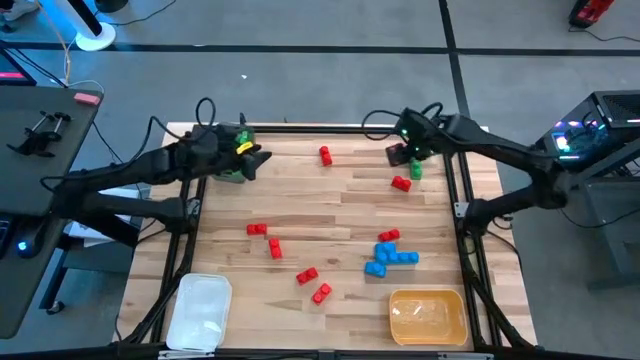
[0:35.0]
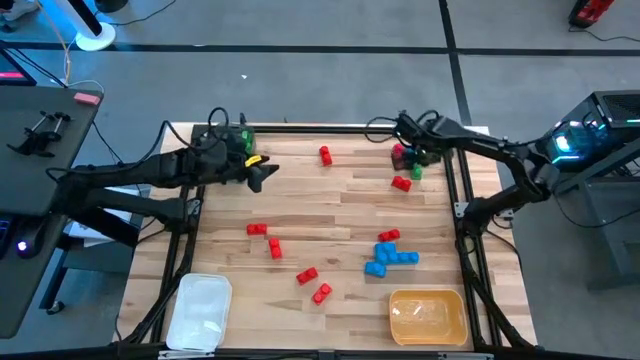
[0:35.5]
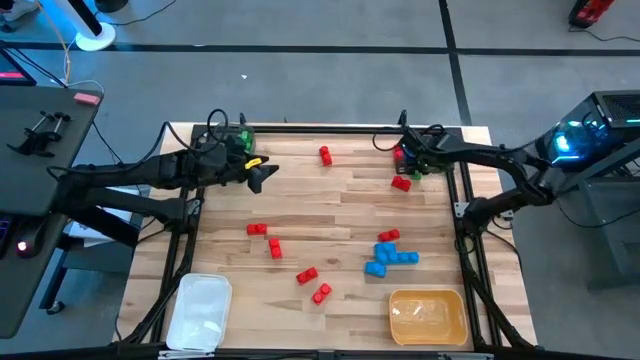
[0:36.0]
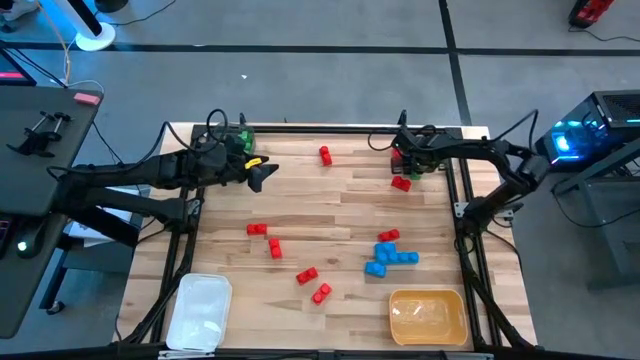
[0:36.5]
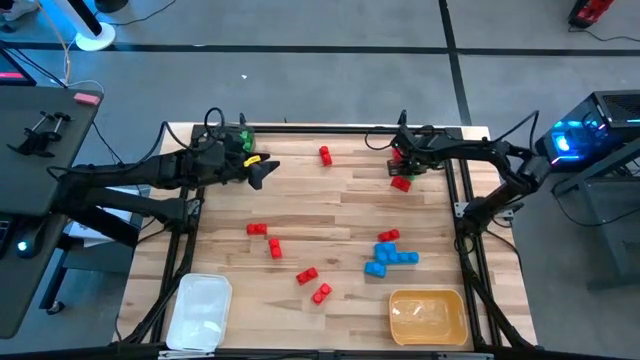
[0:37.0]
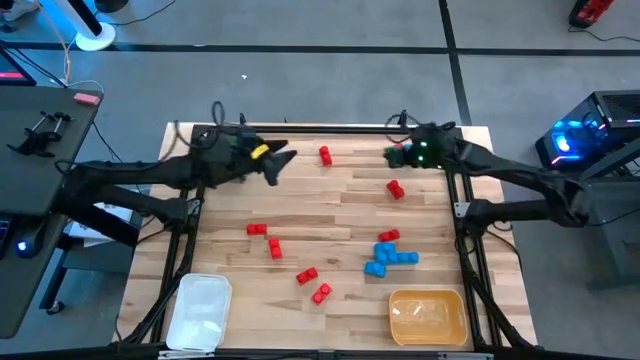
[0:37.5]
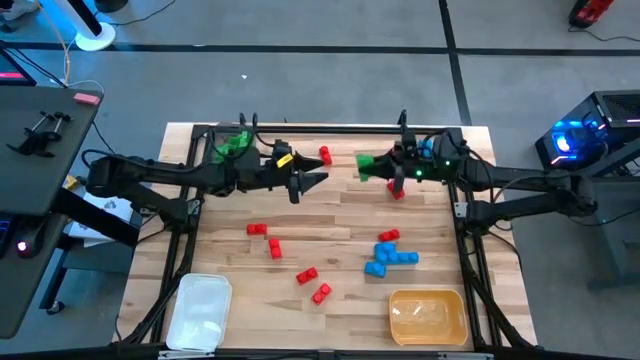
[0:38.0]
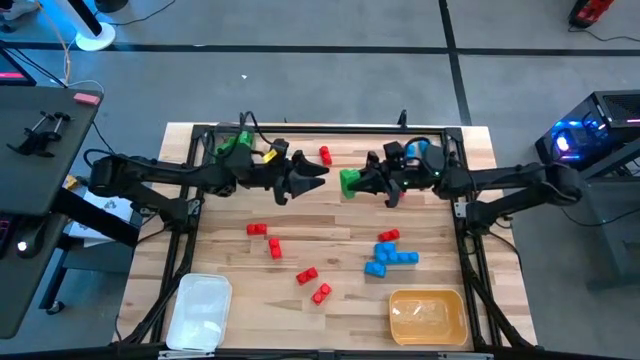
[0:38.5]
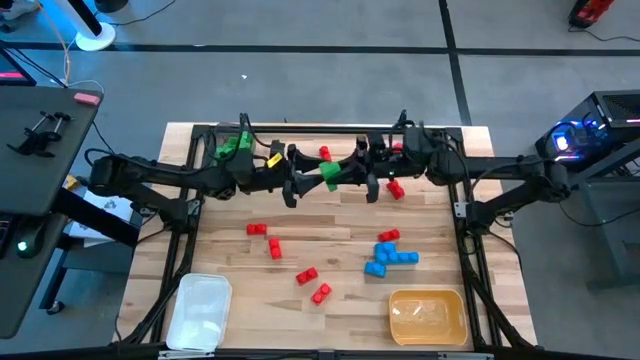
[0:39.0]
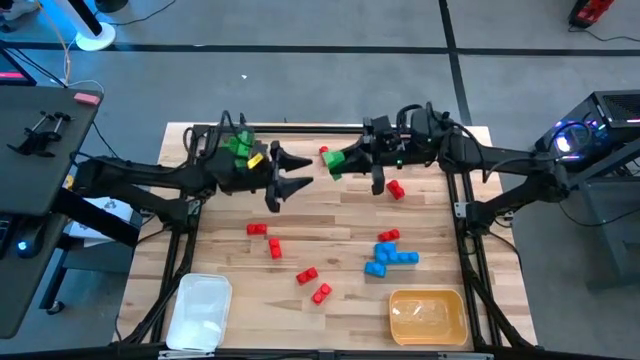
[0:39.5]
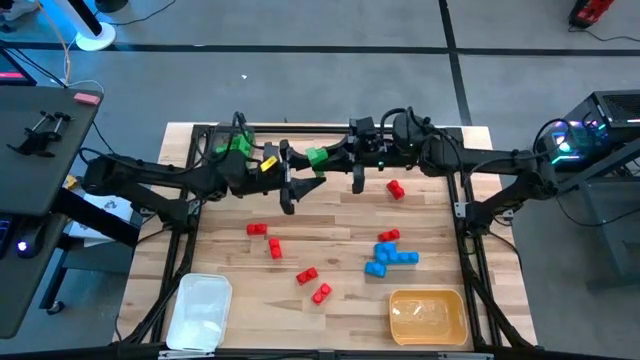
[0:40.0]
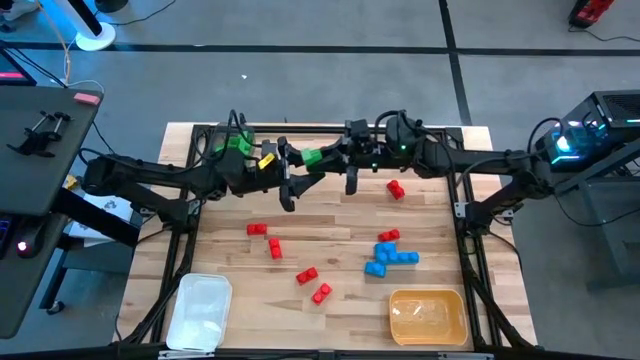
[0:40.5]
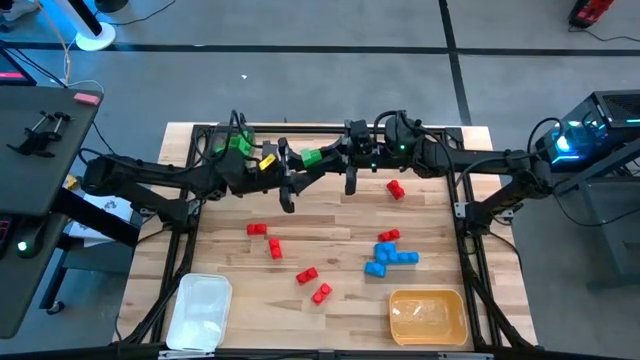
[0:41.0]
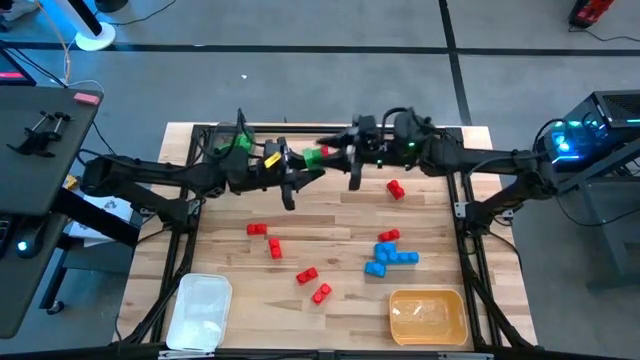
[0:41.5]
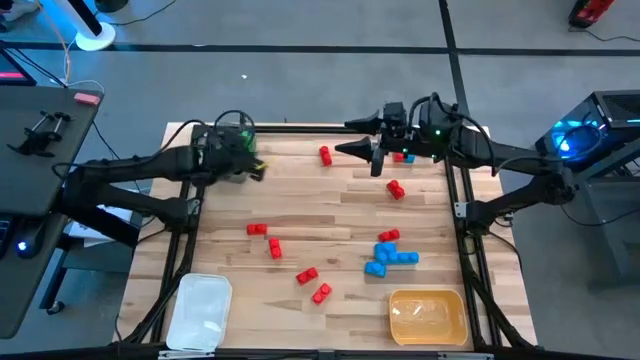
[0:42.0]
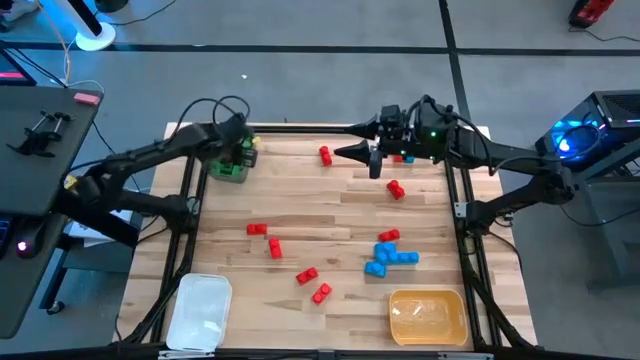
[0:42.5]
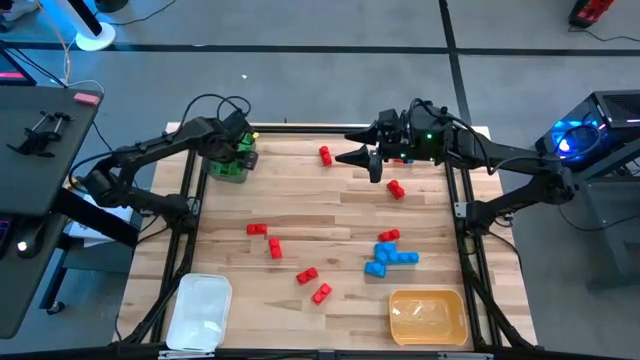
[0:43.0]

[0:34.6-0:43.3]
Task: Sort blocks
Put the green game piece into the black bin

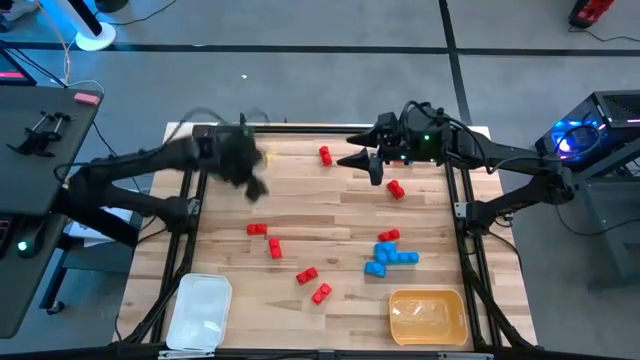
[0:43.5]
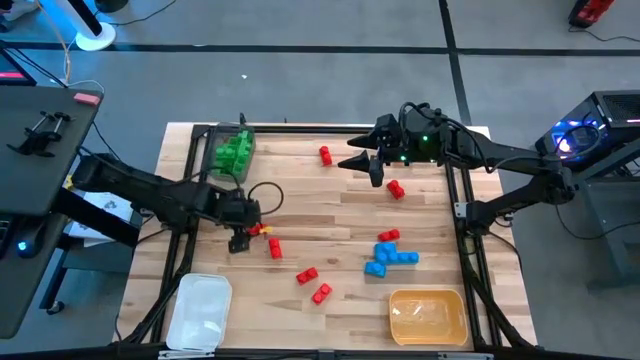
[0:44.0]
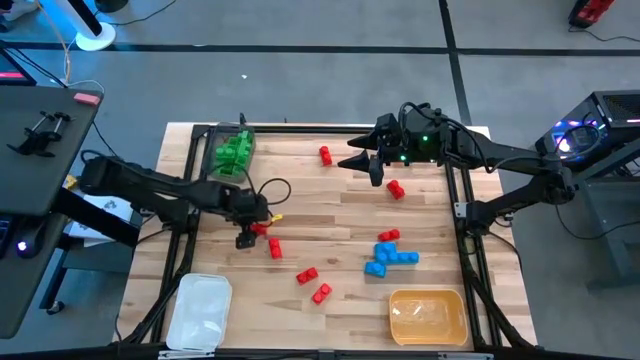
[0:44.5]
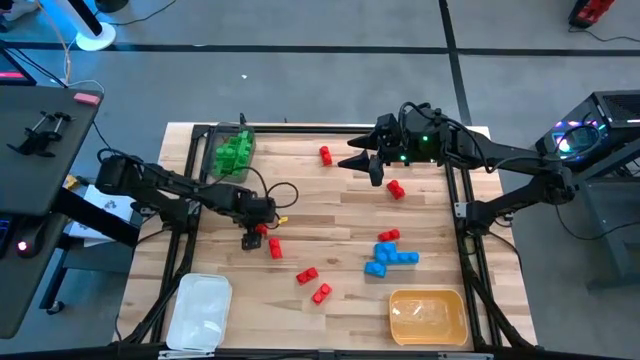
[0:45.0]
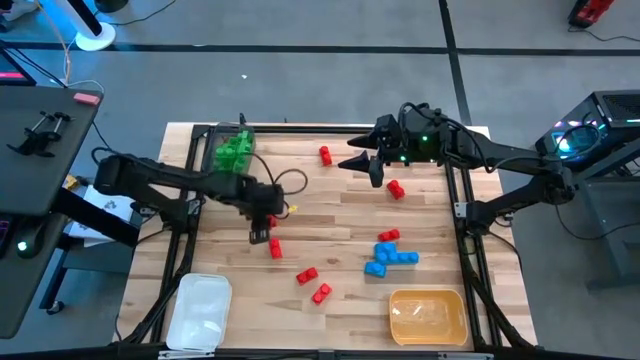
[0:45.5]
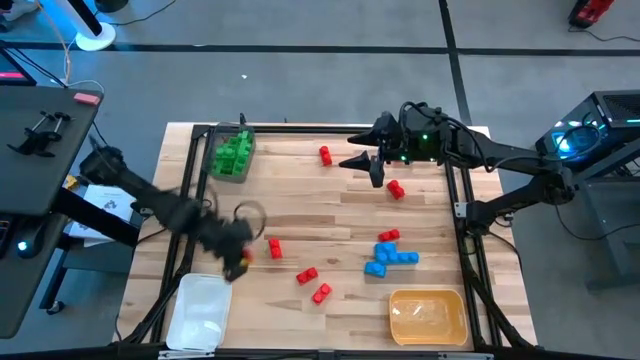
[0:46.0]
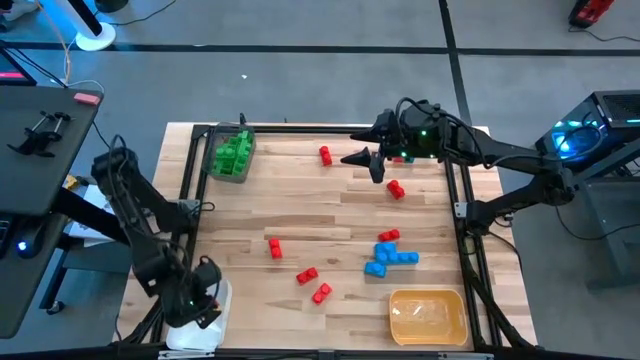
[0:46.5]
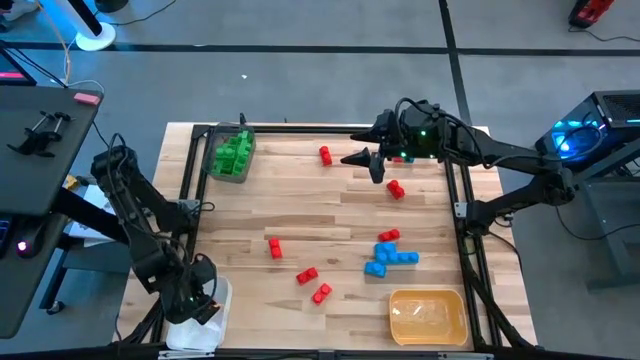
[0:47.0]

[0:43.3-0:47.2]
Put the red game piece into the white bin

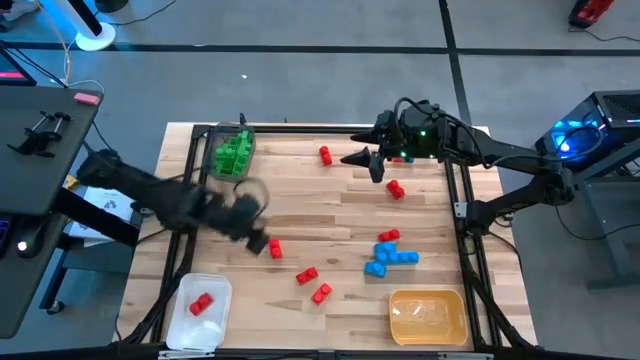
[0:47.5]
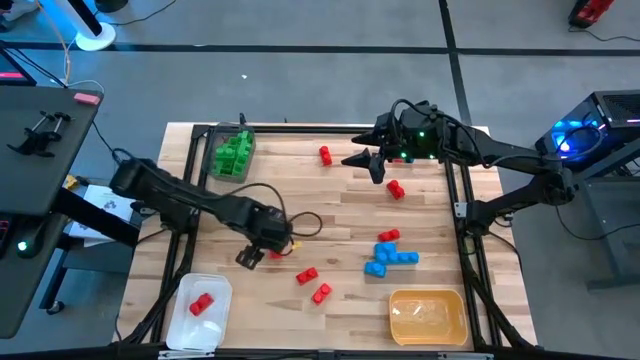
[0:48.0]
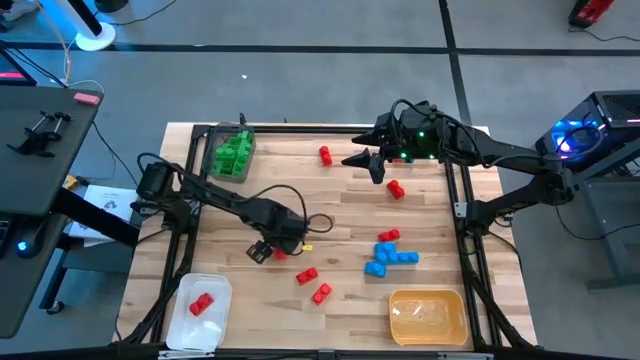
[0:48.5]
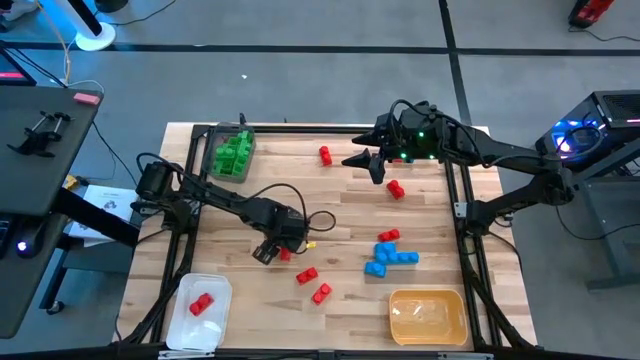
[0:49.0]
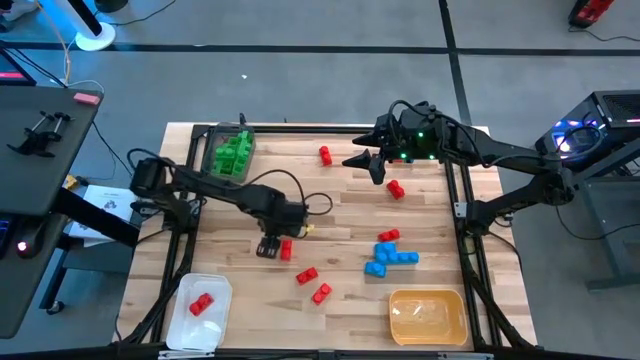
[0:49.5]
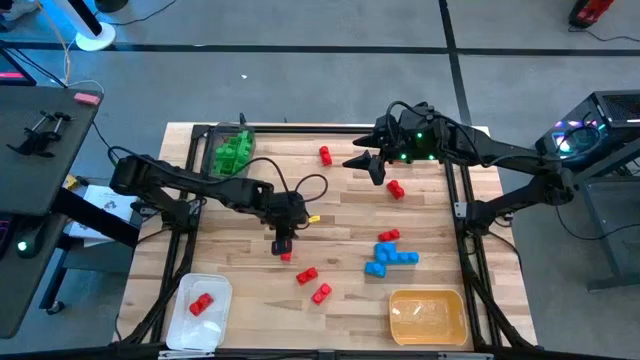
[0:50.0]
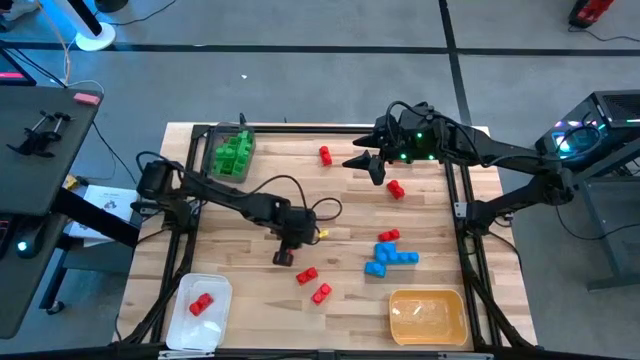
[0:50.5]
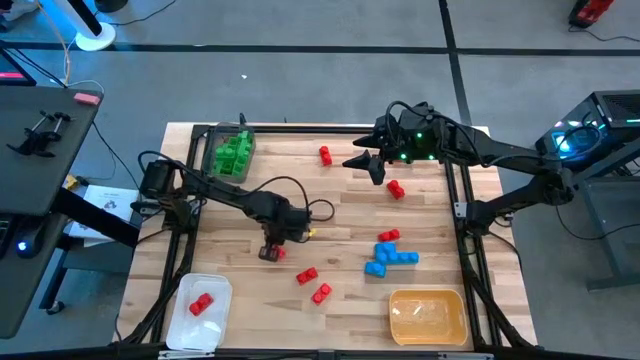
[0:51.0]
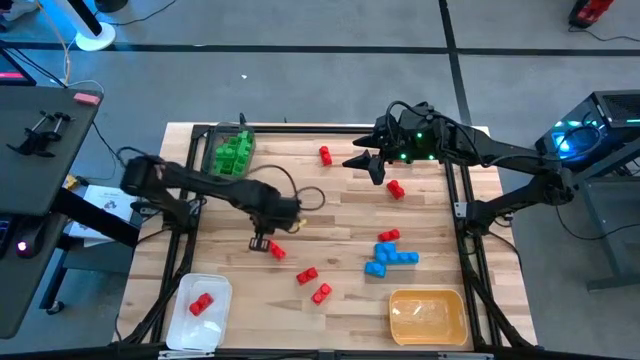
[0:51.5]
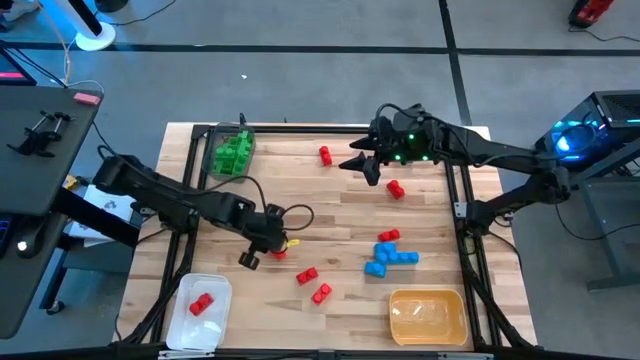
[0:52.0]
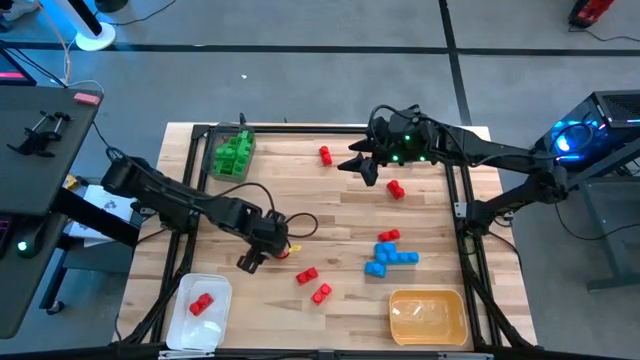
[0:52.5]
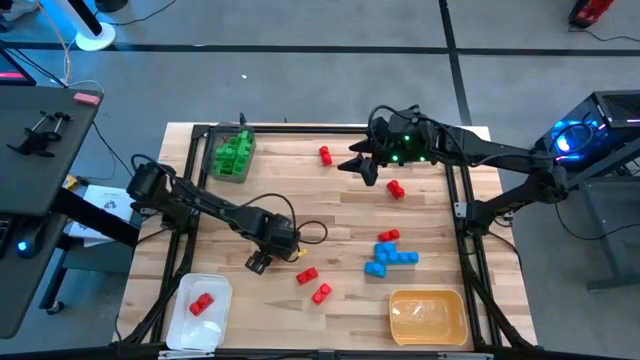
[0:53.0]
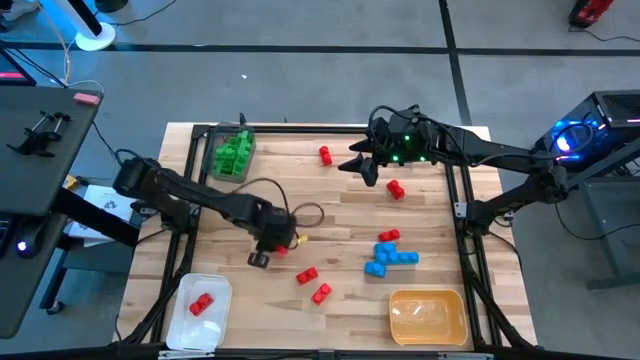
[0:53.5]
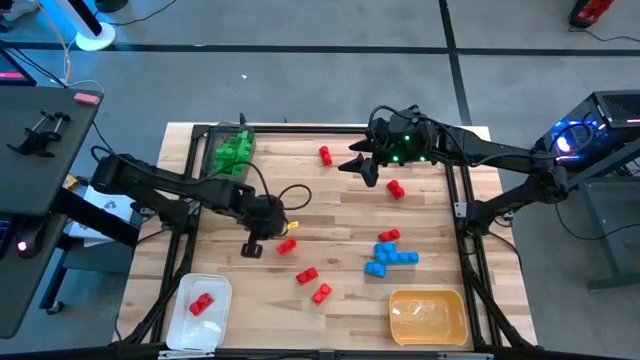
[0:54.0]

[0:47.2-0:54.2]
Put the red game piece into the white bin

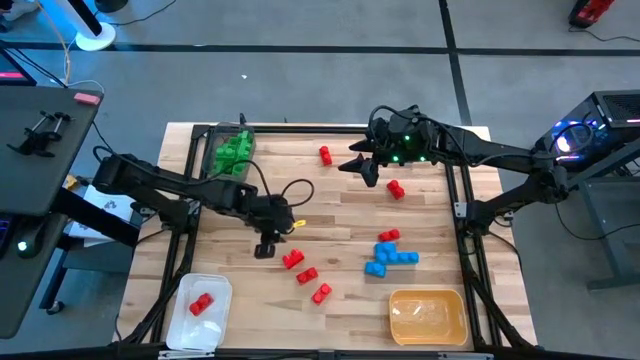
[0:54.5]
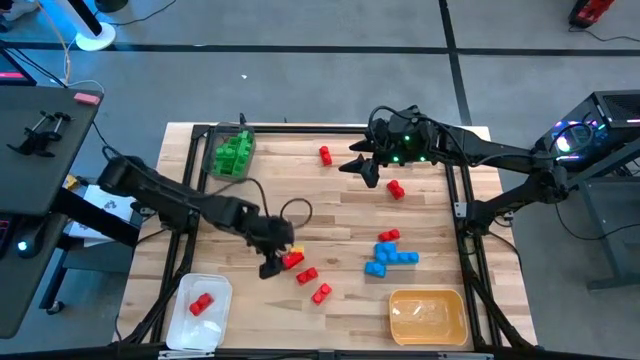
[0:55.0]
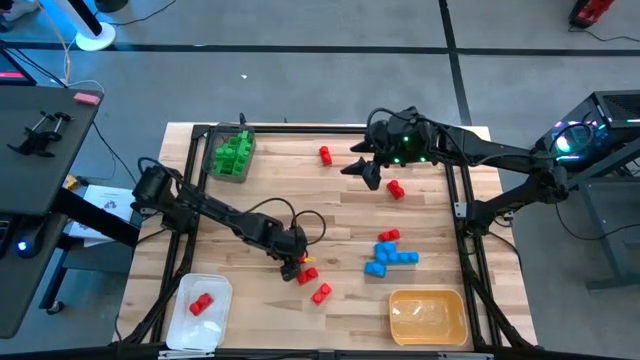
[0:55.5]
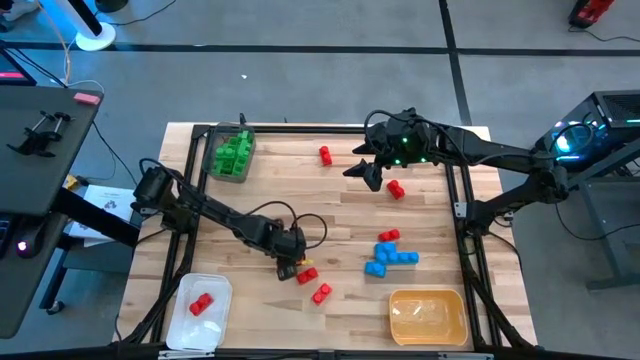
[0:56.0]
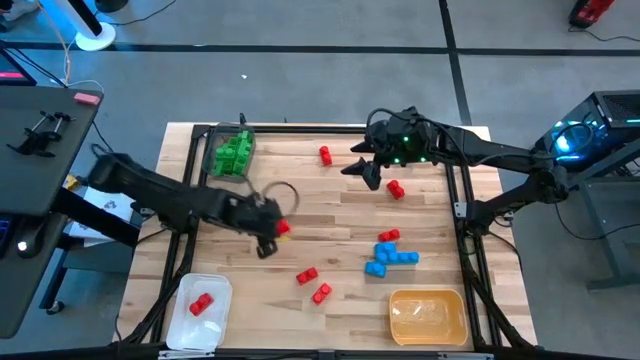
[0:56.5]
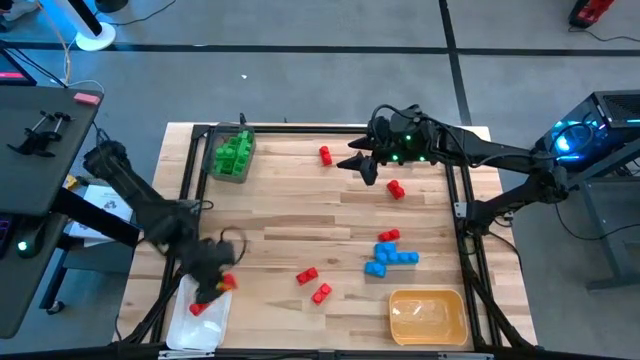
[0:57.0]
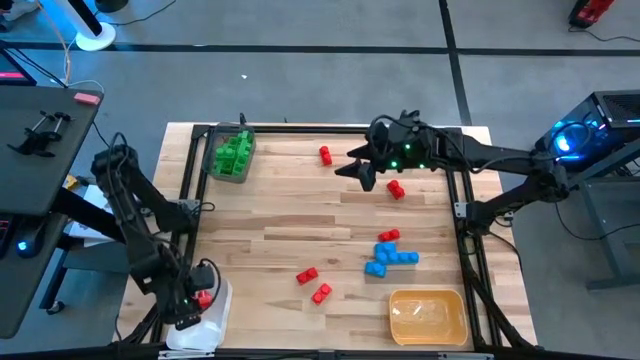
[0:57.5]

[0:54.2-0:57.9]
Put the red game piece into the white bin
